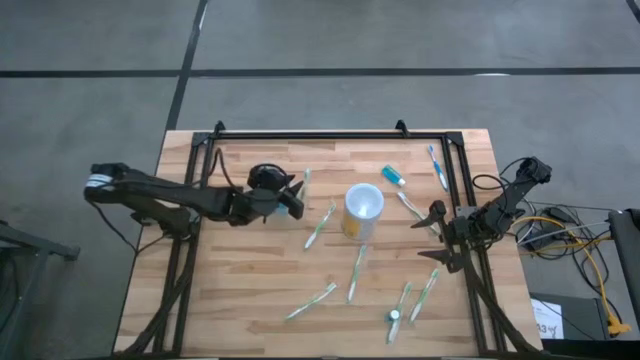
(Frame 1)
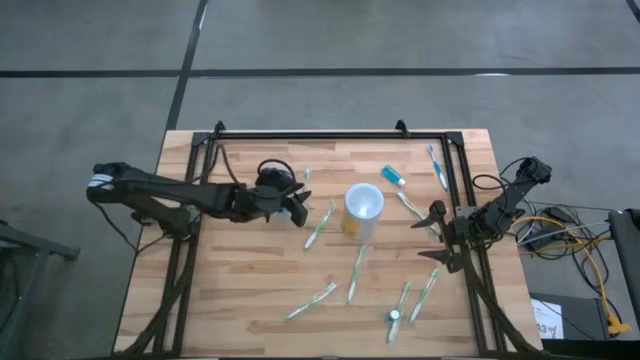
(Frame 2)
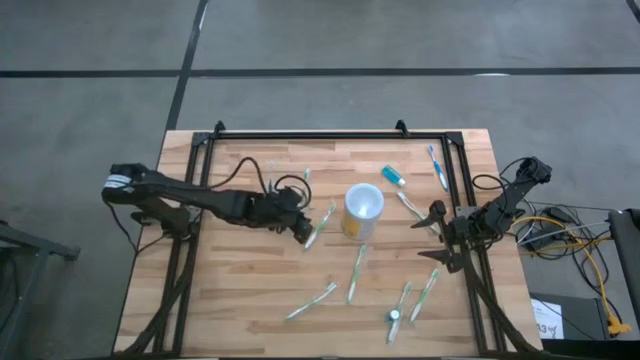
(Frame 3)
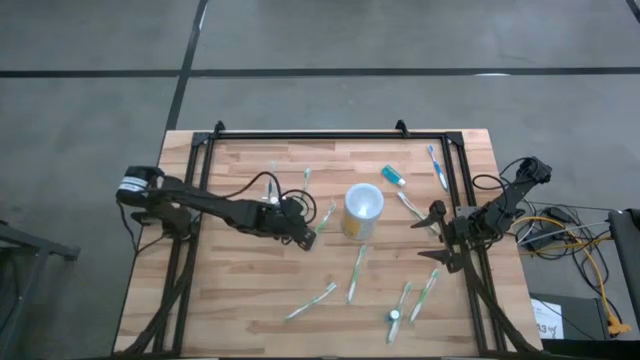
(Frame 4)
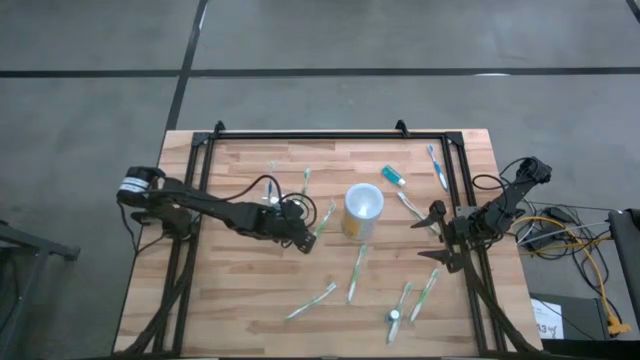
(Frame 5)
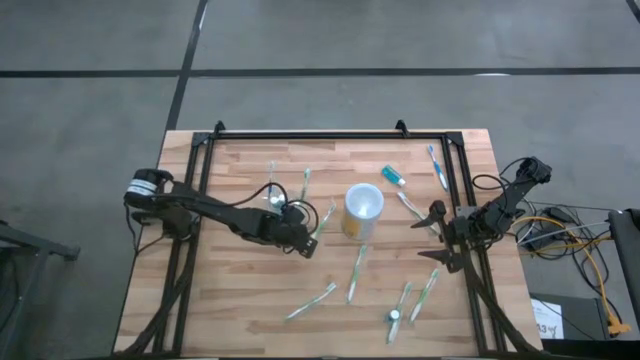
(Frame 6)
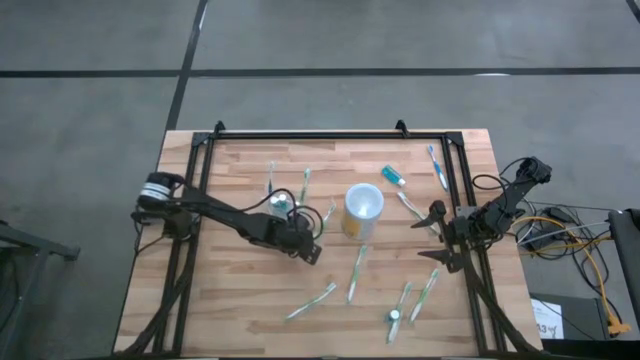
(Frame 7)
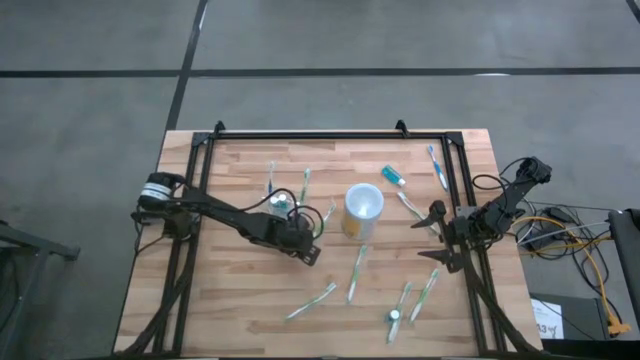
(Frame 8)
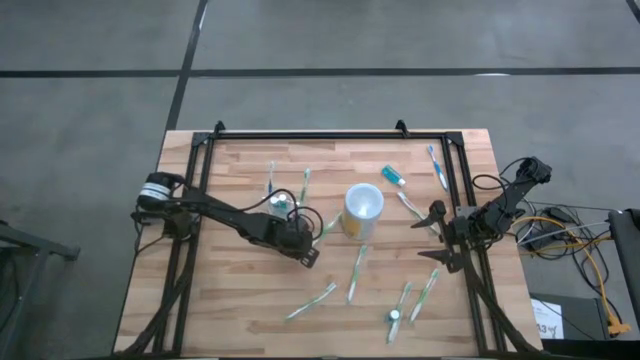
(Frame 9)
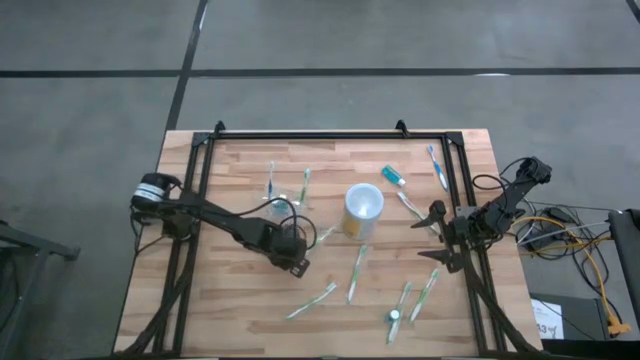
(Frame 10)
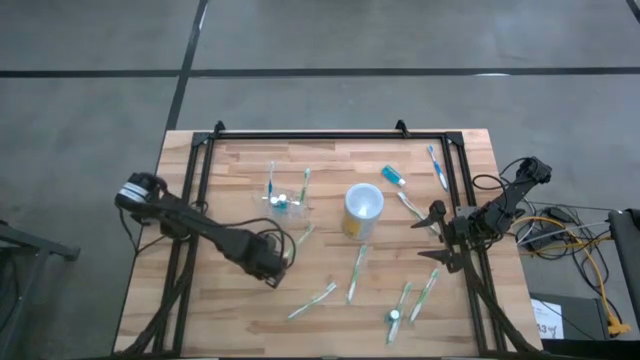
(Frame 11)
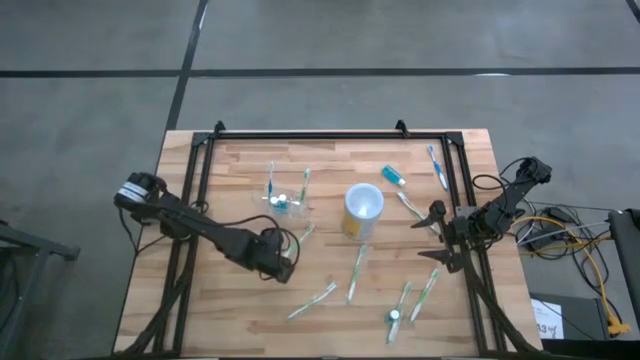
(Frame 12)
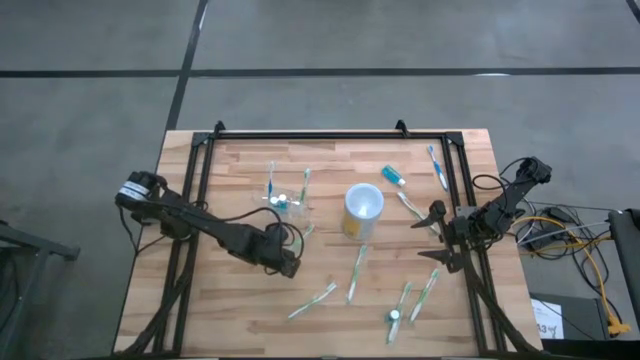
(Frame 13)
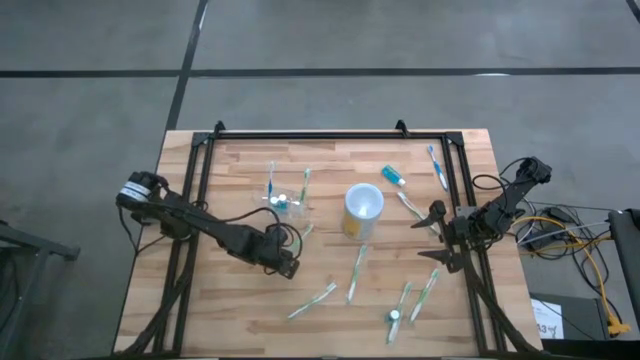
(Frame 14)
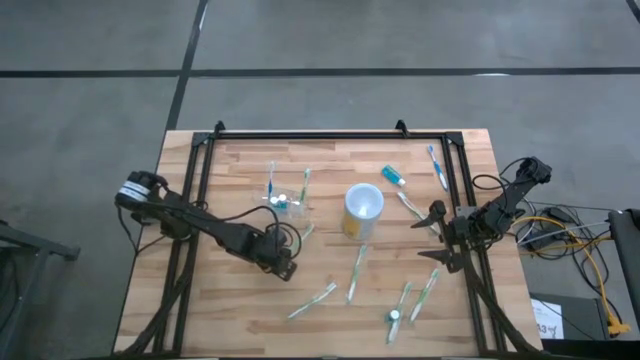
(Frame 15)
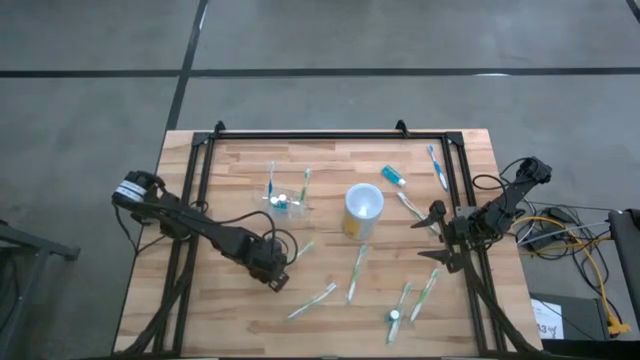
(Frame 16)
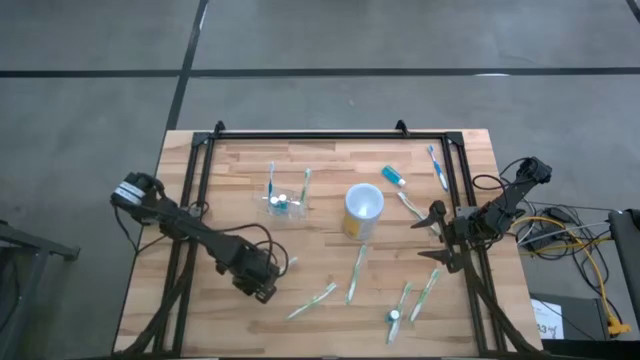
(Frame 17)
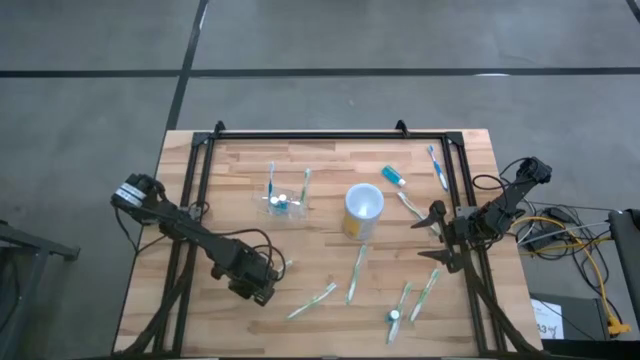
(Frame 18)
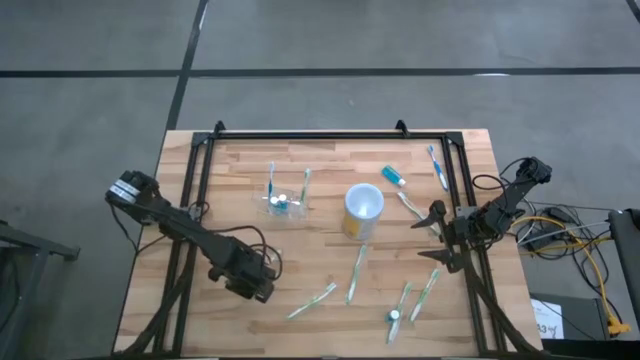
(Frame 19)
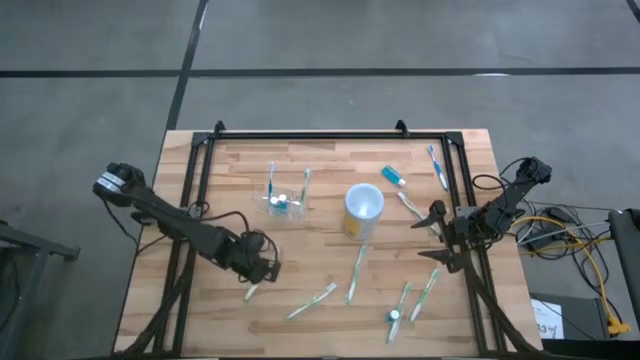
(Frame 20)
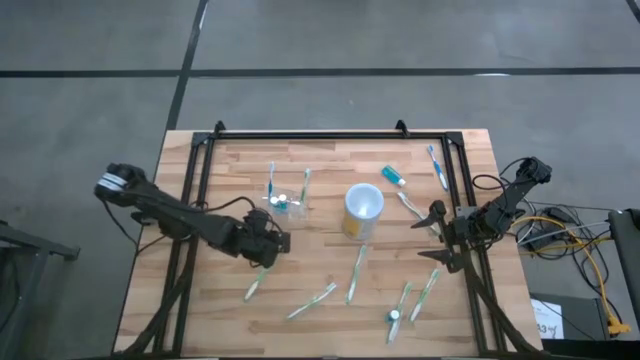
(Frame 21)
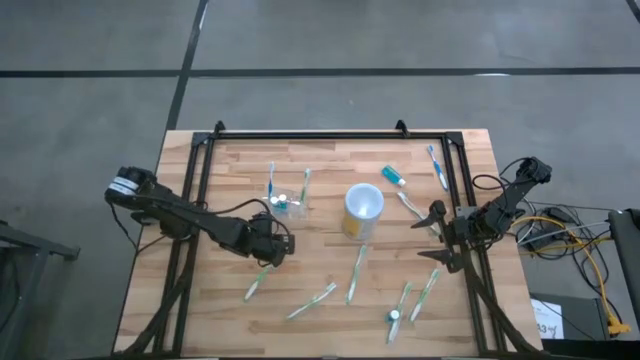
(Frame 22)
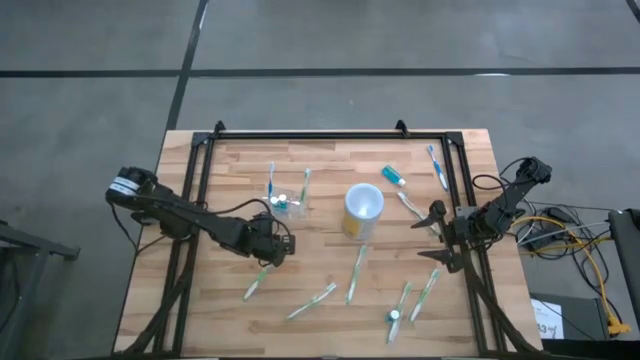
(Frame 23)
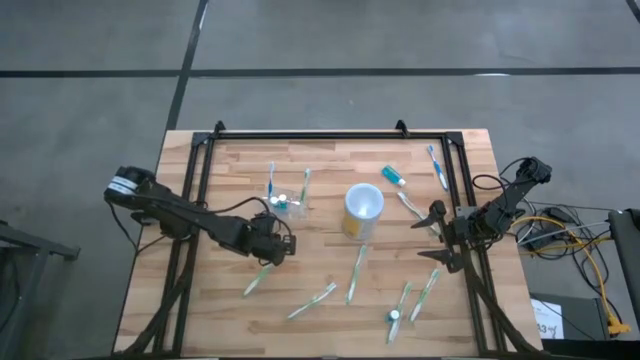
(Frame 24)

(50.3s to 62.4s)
Task: Pick & Place toothbrushing station
Put the green toothbrush into the right section of the transparent organizer

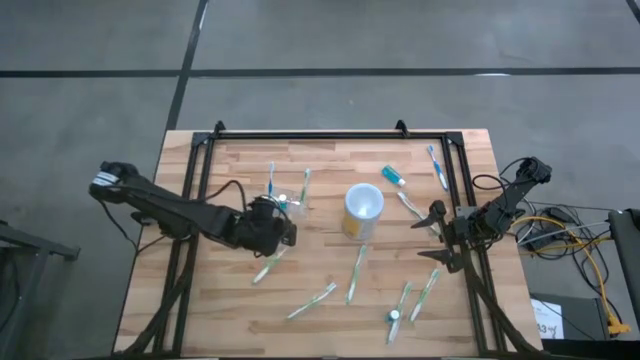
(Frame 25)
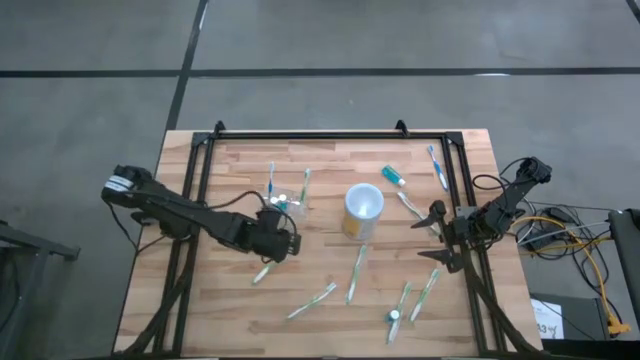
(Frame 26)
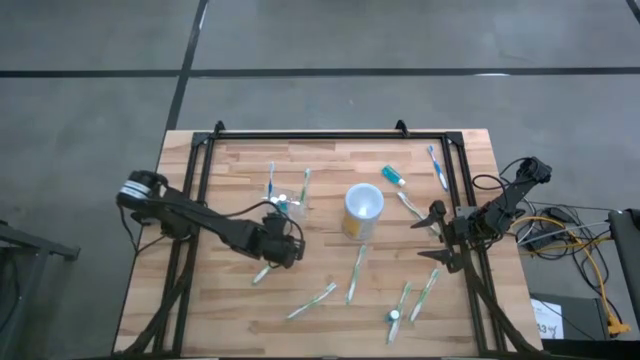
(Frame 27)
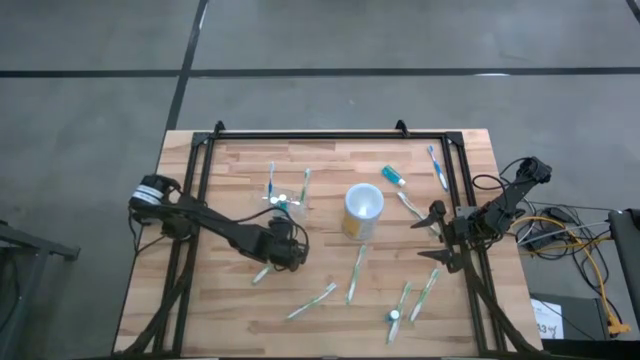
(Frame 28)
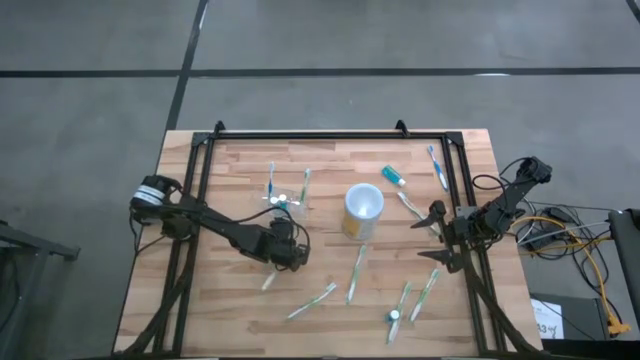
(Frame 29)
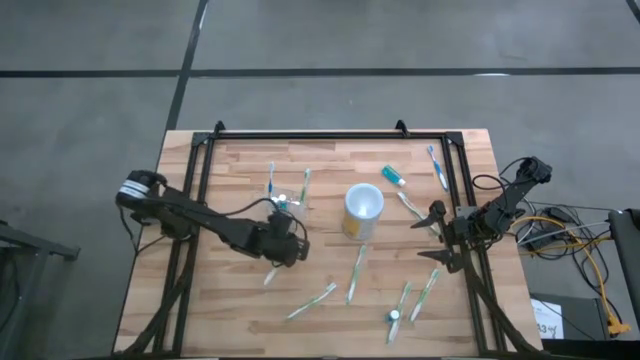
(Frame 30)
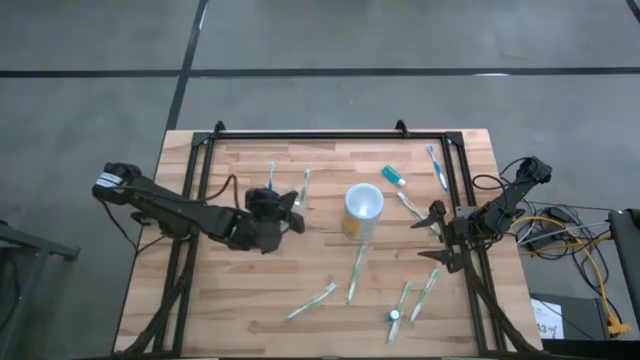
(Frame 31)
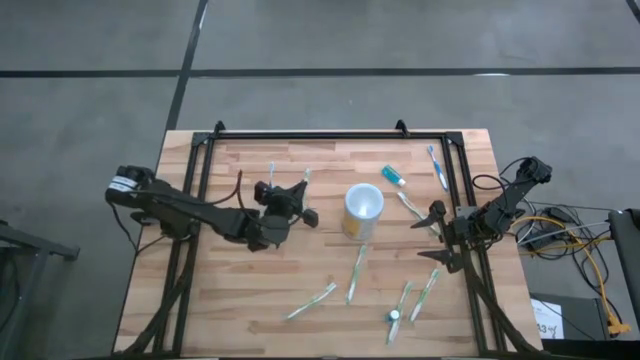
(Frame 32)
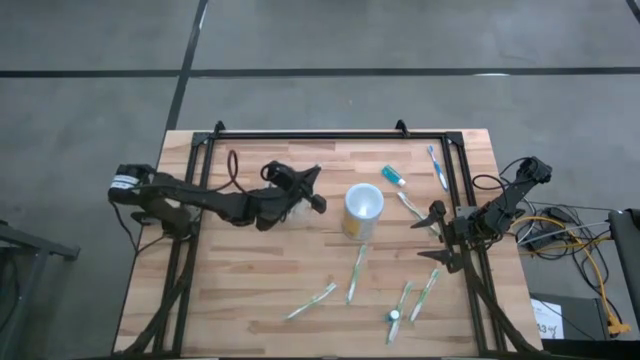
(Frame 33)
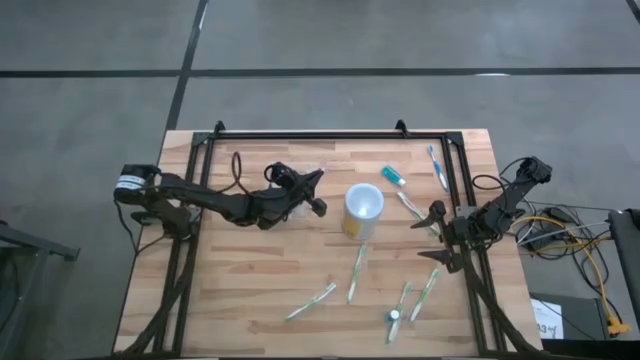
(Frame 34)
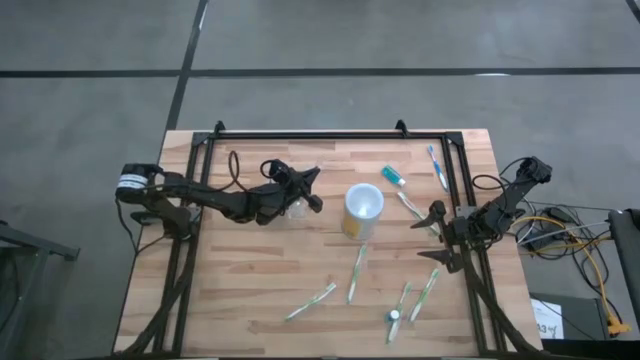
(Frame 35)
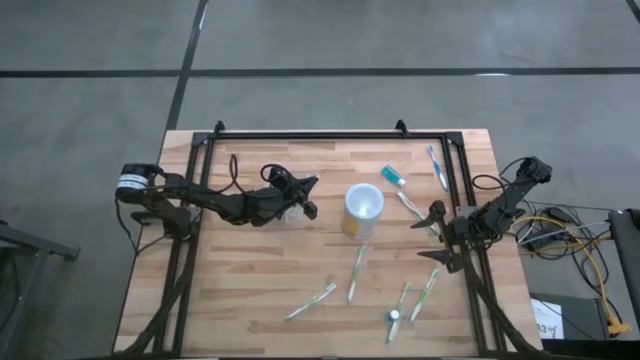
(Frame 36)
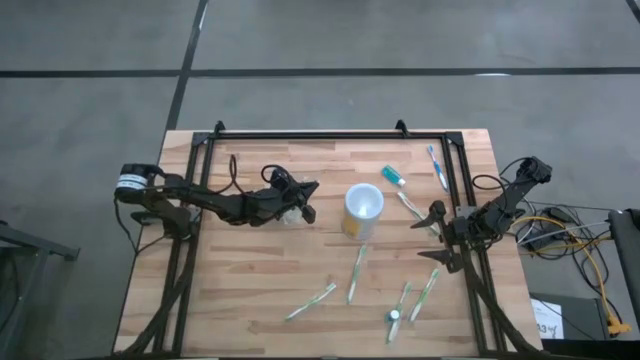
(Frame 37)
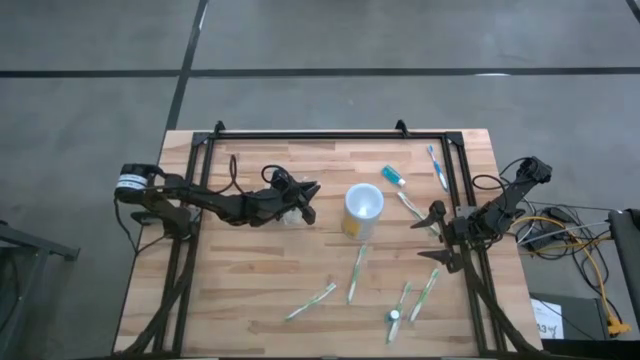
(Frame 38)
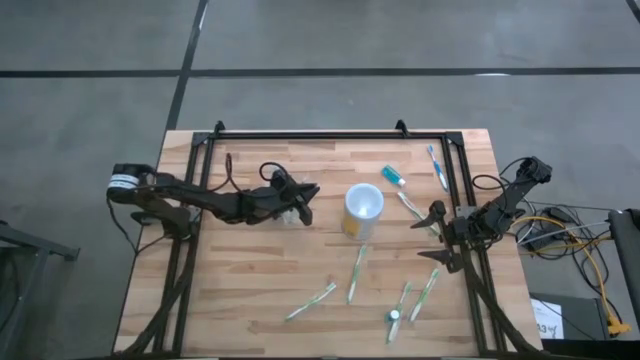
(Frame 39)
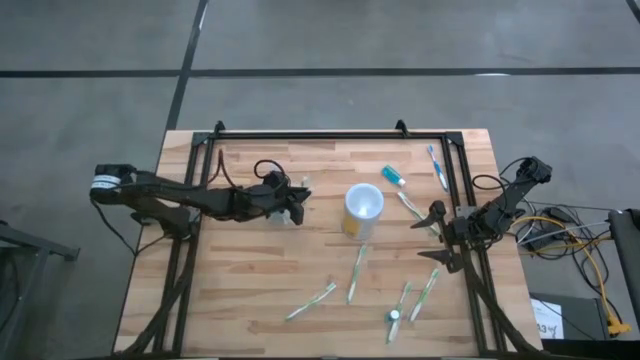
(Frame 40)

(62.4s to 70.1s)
Put the green toothbrush into the right section of the transparent organizer
